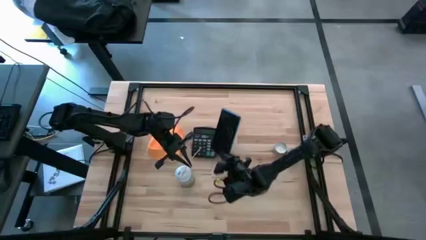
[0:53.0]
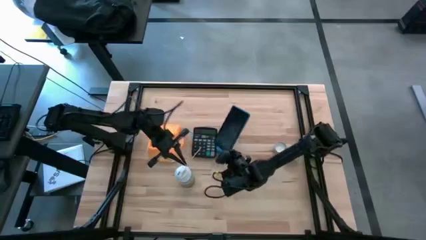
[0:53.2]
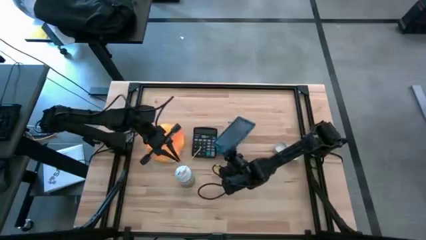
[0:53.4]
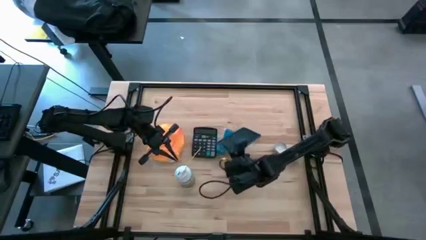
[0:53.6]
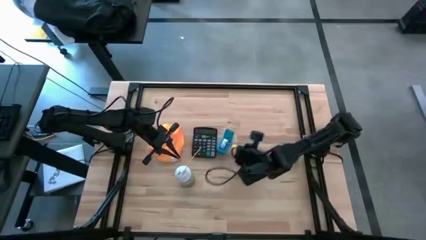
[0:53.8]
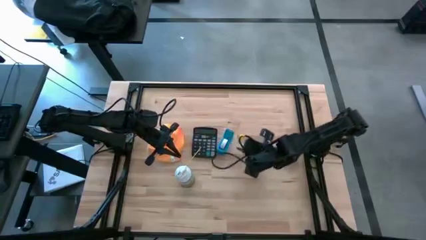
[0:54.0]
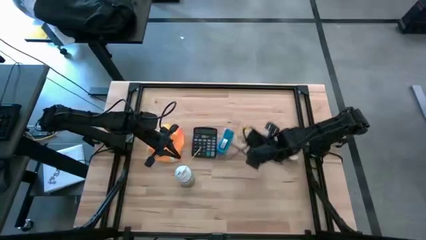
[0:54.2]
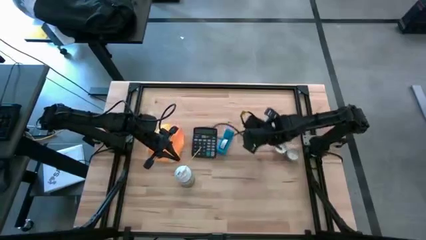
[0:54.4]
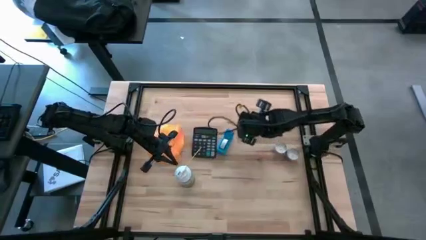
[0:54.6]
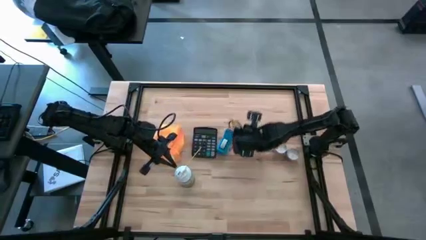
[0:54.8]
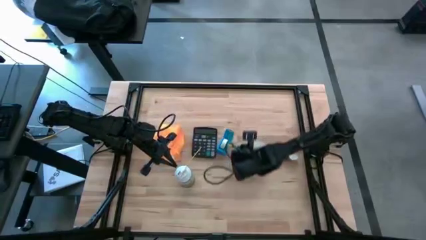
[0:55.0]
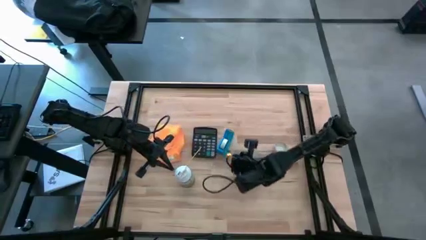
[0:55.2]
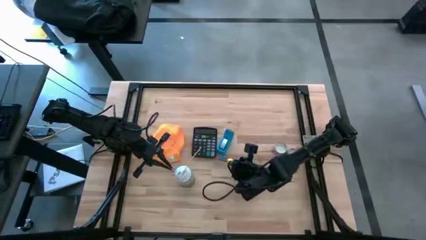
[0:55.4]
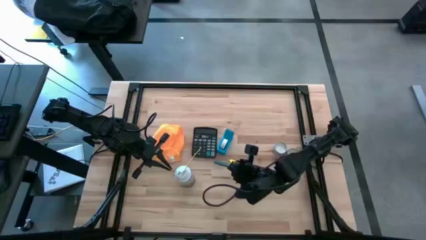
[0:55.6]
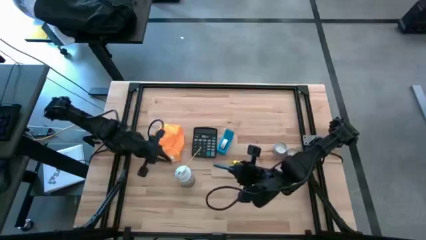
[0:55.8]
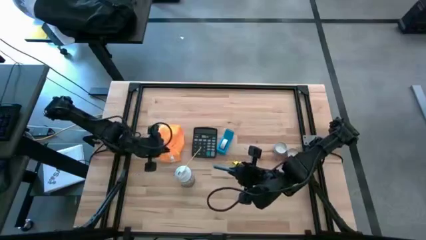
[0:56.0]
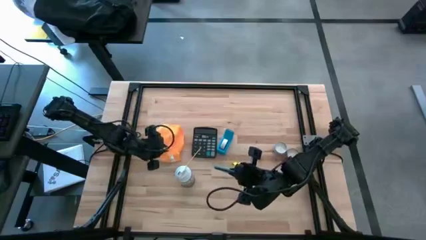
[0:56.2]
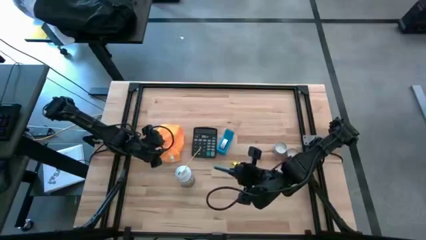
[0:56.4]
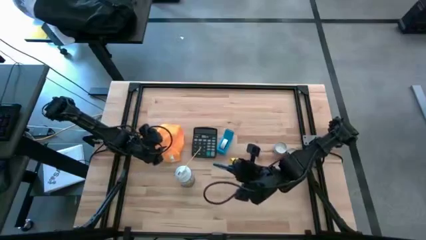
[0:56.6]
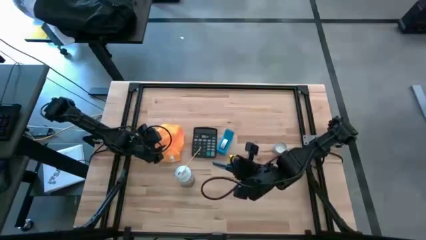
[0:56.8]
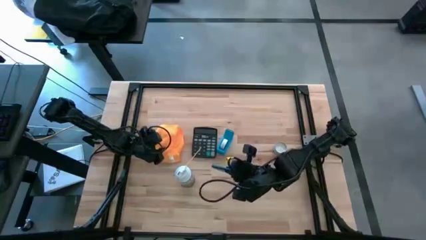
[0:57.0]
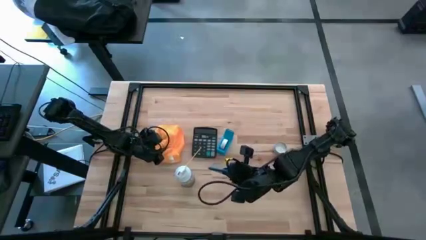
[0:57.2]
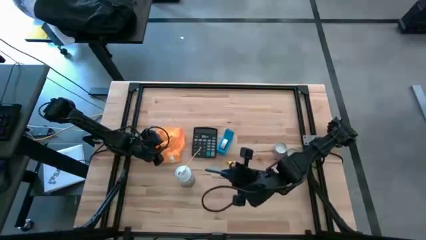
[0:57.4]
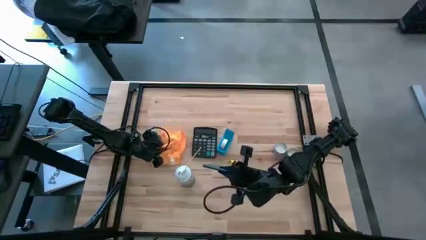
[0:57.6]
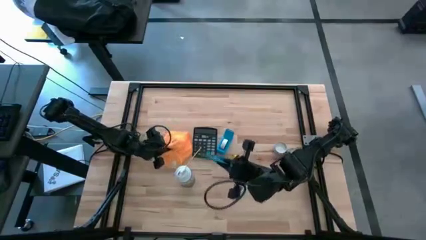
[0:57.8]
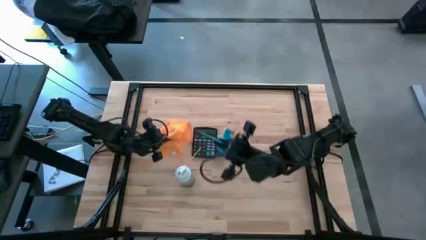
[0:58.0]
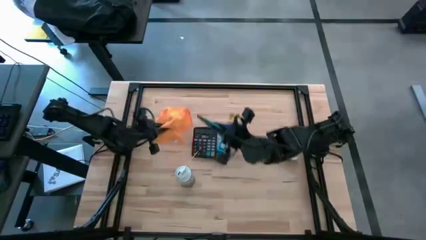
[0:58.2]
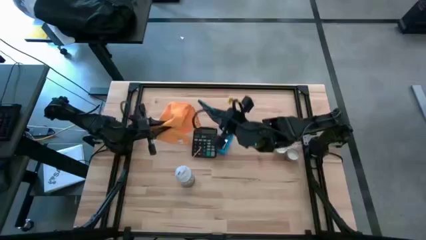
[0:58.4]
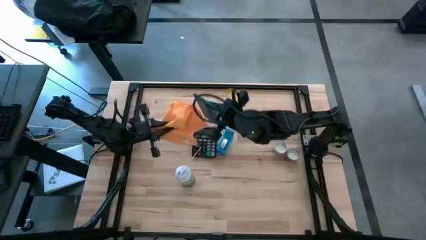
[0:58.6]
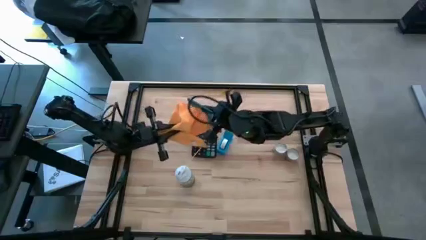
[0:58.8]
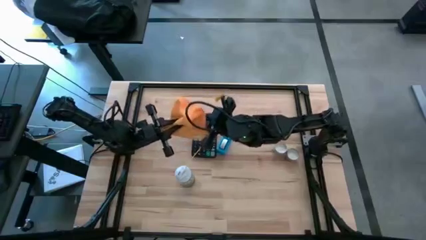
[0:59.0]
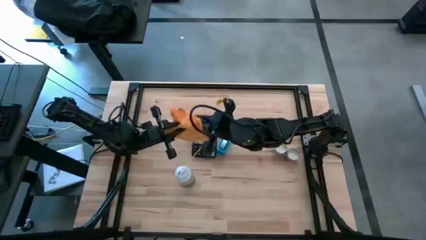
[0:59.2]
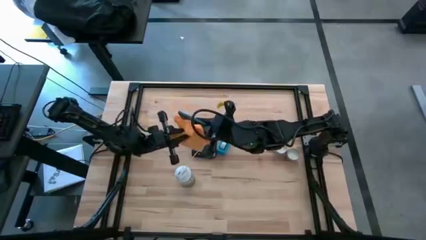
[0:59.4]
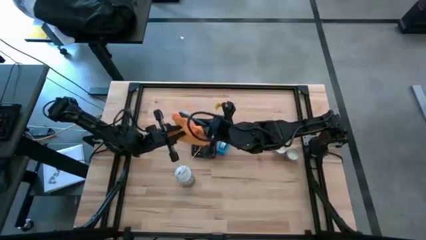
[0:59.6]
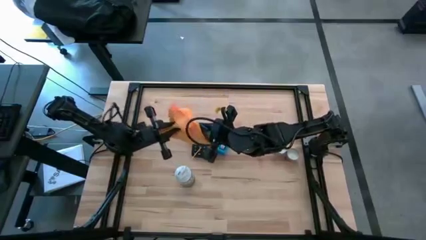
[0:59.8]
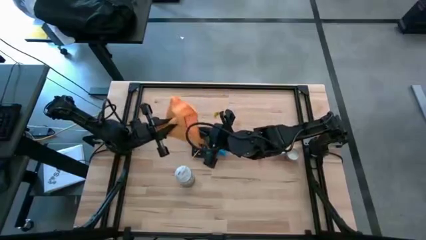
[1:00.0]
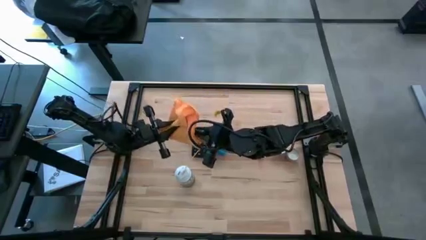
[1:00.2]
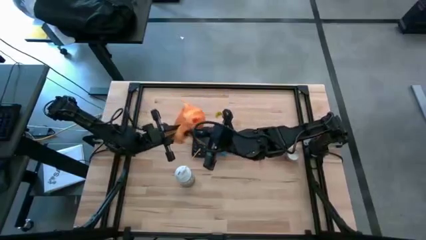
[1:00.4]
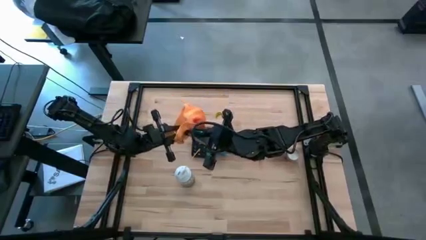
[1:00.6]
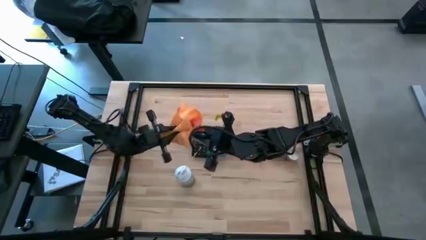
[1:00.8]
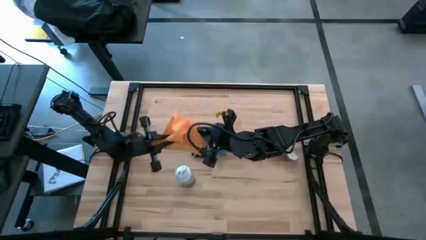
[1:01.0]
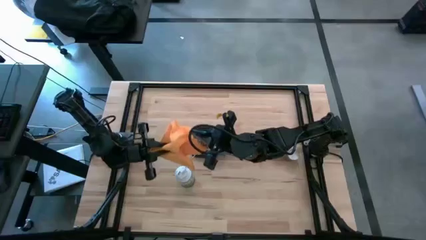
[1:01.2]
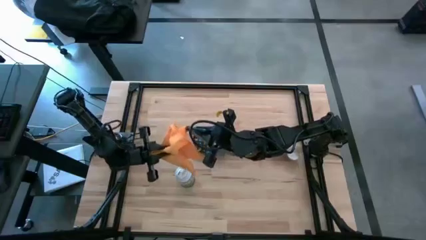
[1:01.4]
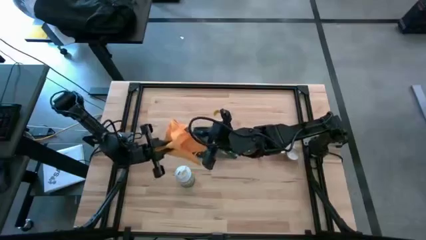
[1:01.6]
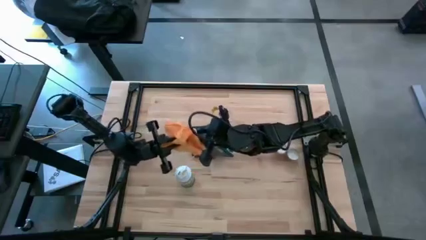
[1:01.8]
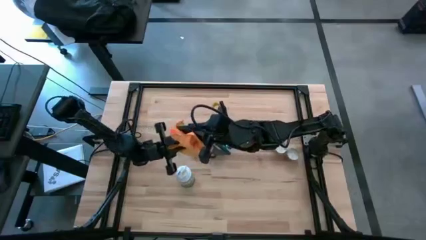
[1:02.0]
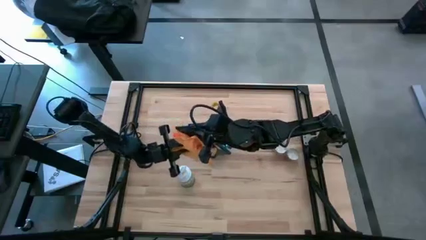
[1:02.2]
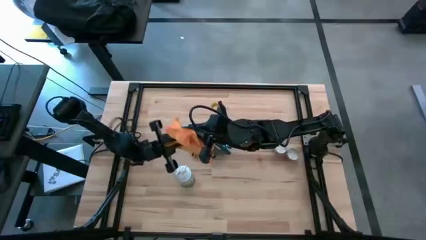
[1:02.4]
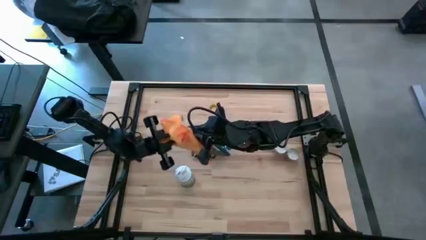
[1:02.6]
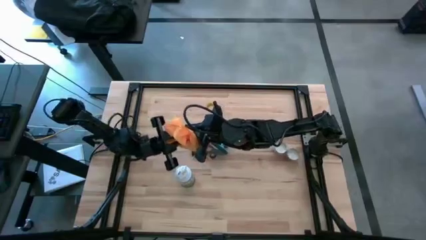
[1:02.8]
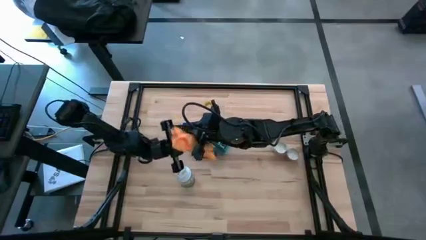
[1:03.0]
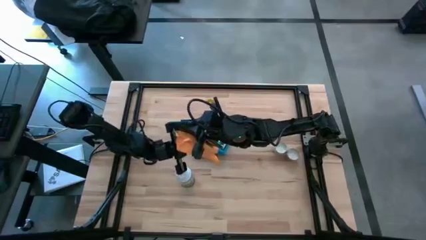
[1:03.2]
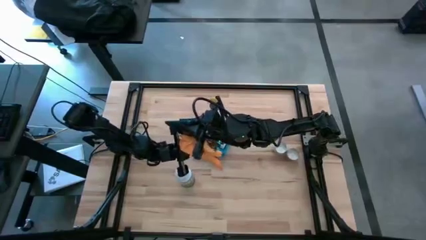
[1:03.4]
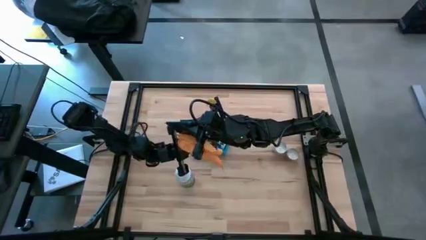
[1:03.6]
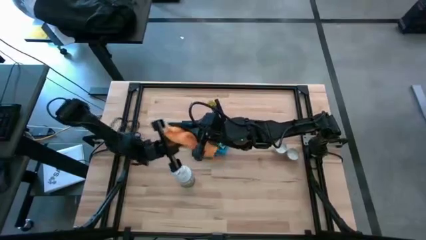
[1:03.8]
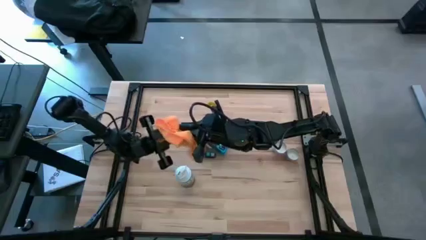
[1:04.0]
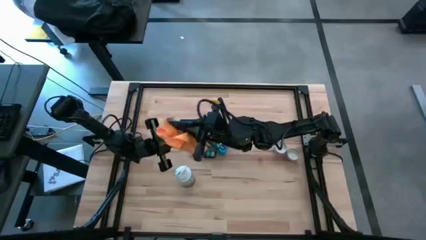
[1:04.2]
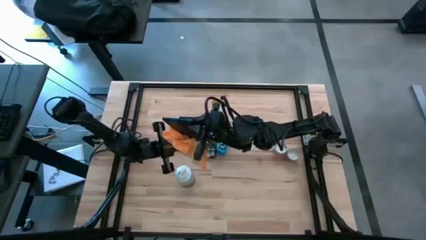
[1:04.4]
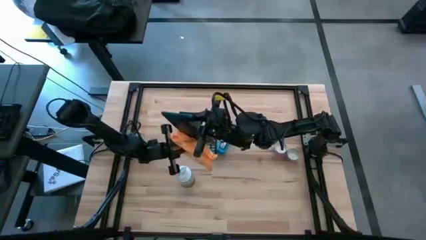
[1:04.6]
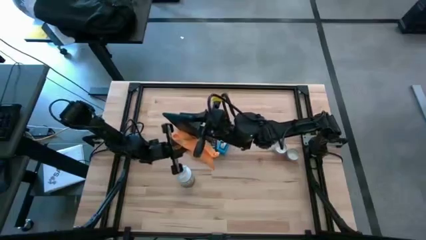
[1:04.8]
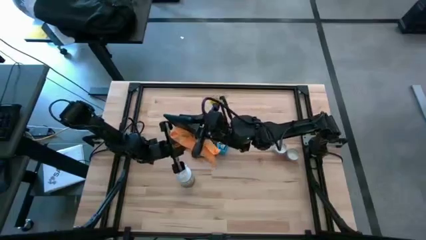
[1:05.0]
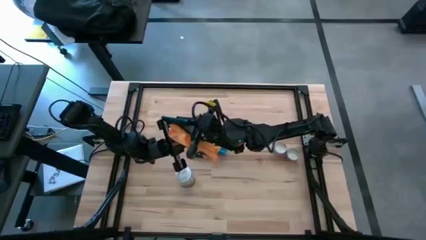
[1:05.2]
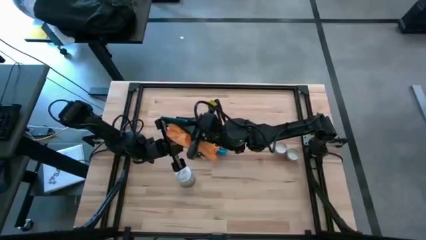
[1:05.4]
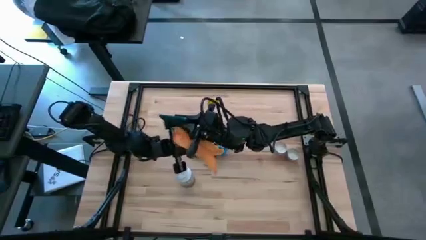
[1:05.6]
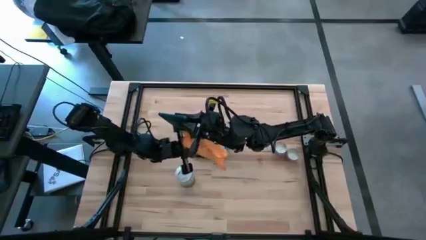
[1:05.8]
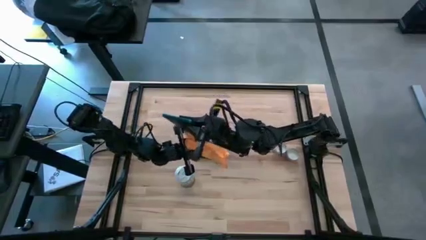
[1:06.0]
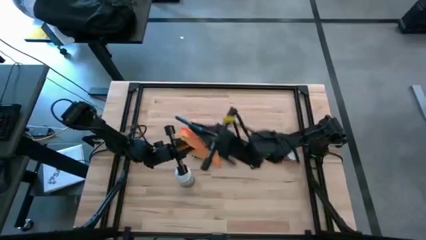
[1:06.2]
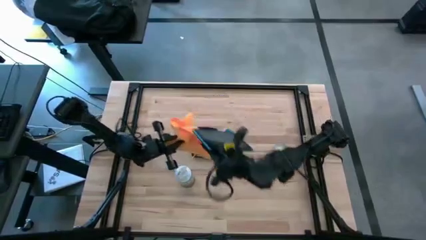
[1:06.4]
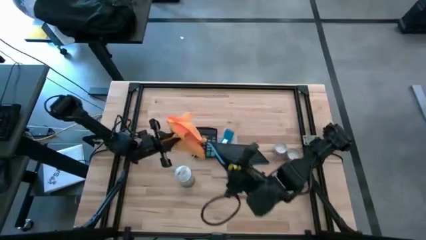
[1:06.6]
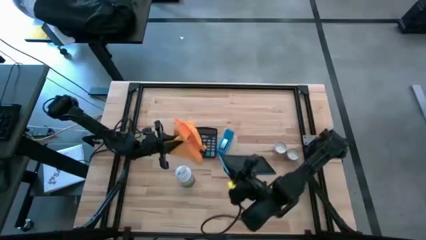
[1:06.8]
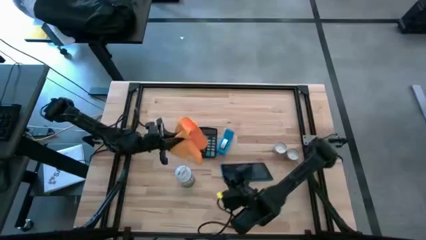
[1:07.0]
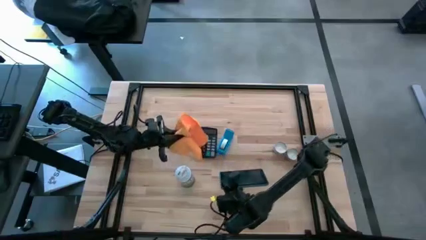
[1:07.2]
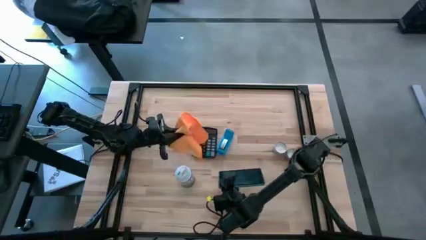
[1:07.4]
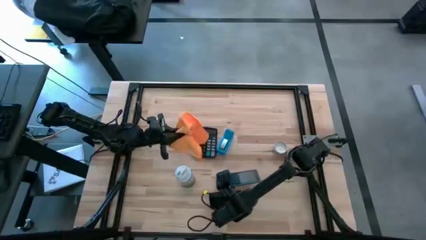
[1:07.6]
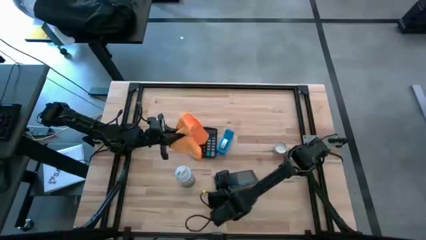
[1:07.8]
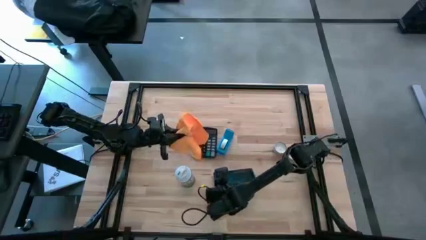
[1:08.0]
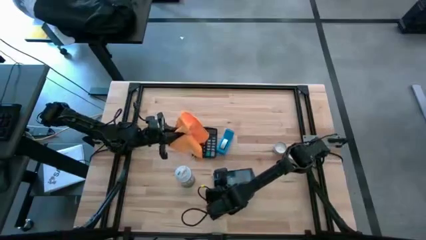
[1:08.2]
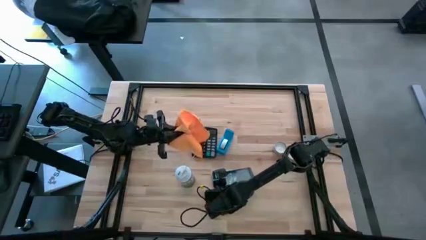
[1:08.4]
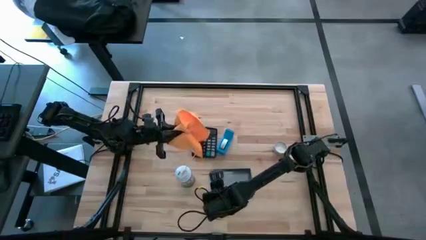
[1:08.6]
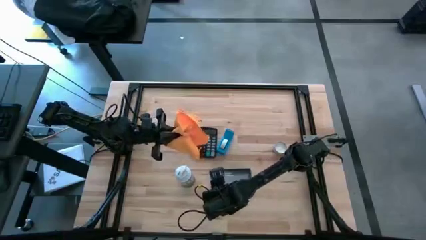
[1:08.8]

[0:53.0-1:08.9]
Task: Apply microfiber cloth
Wipe the tablet with the orange microfiber cloth
